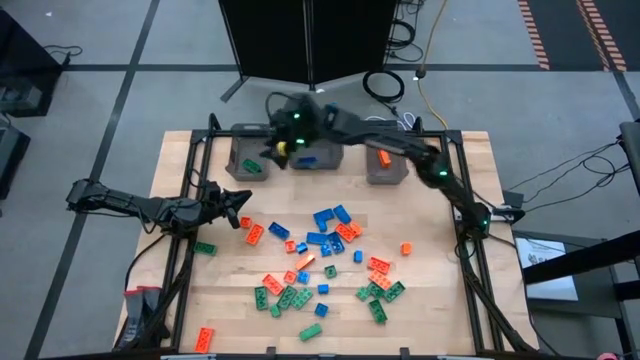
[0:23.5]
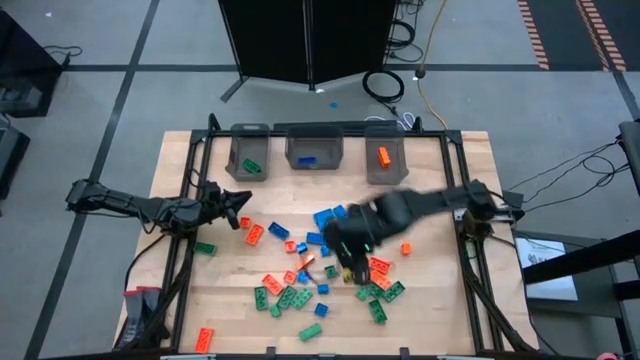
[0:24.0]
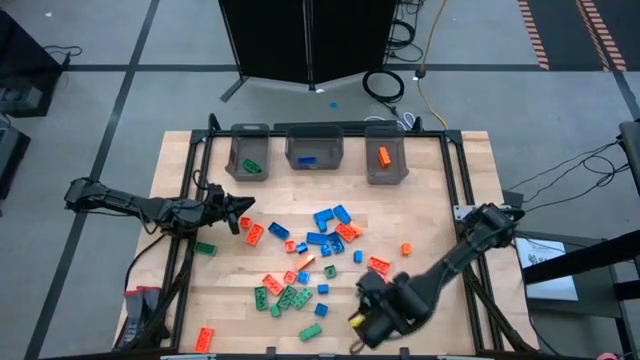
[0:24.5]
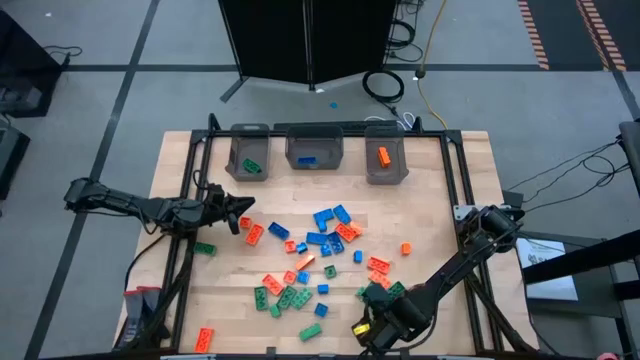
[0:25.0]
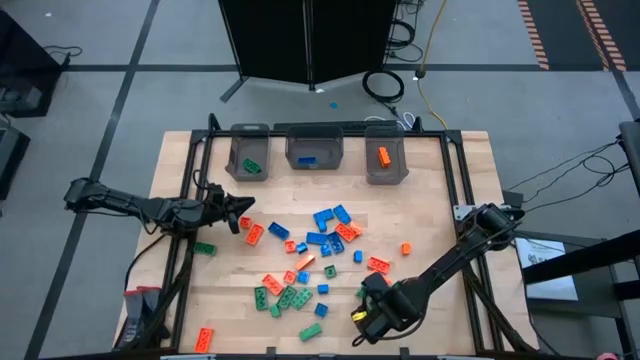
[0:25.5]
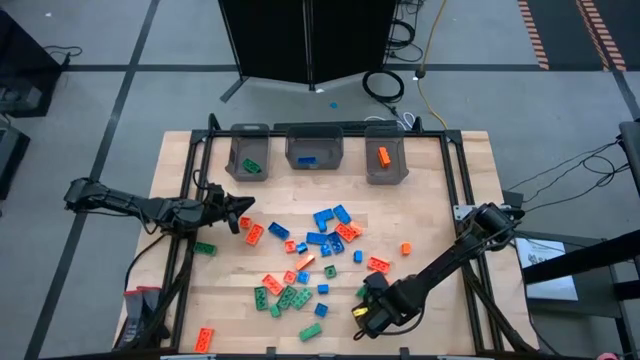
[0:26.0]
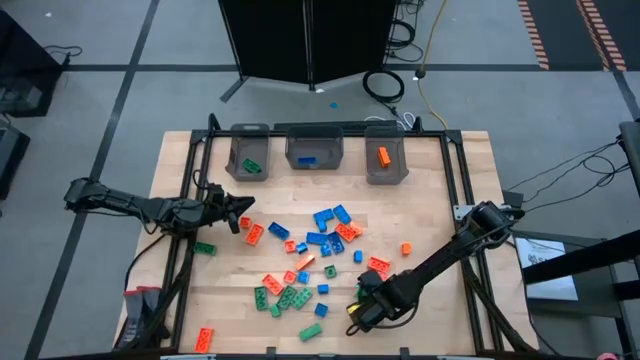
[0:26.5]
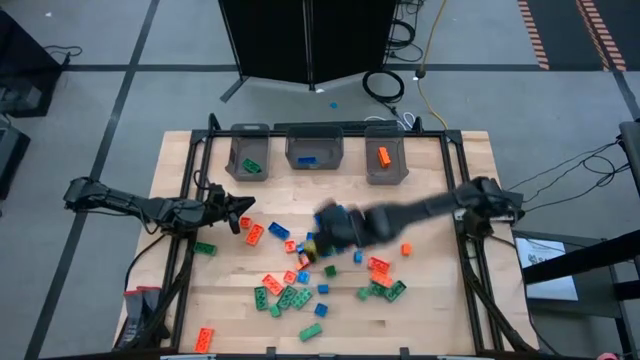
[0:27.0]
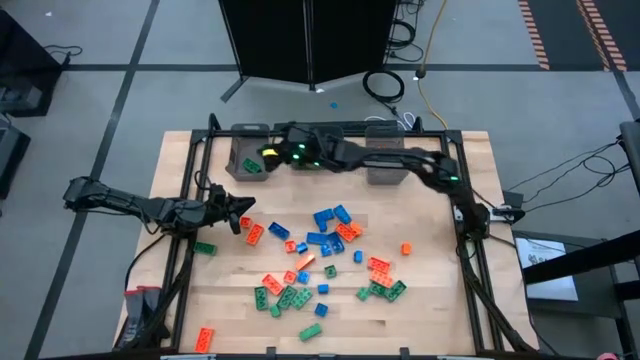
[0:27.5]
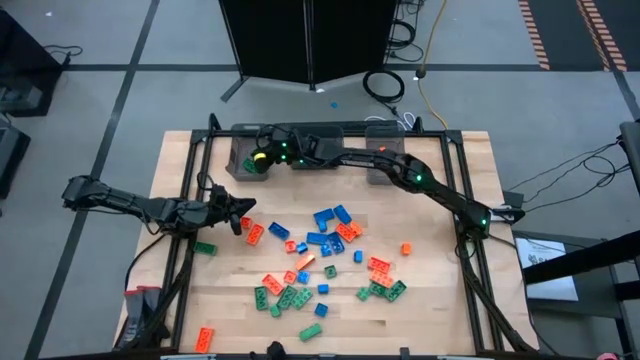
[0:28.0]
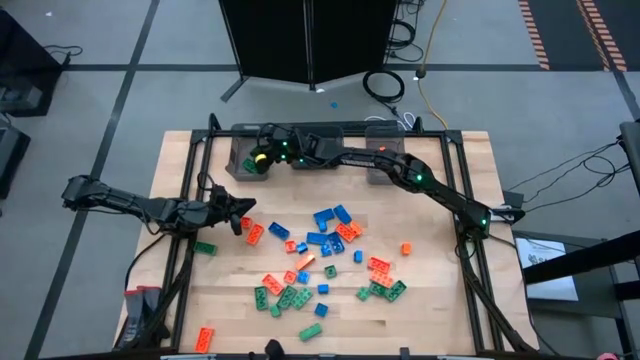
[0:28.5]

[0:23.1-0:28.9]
Task: Sort blocks
Put the green game piece into the left black bin

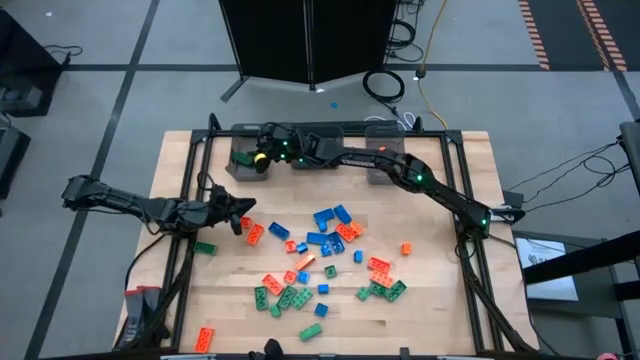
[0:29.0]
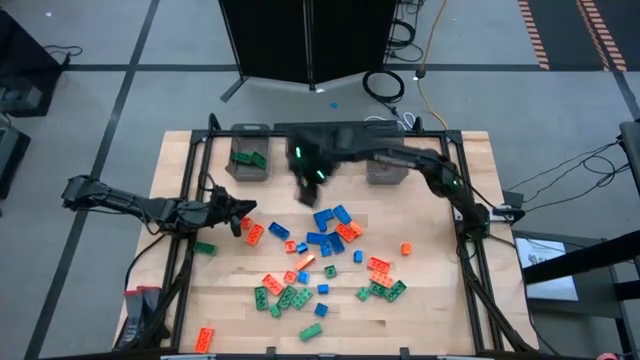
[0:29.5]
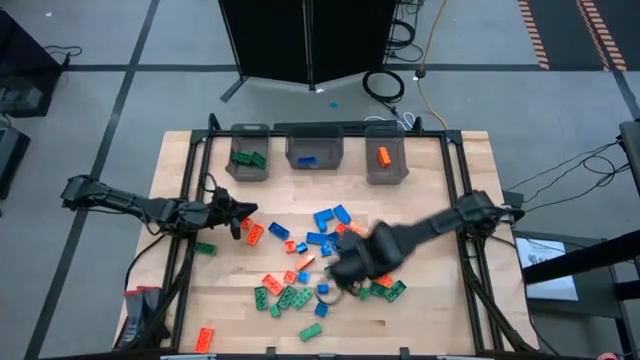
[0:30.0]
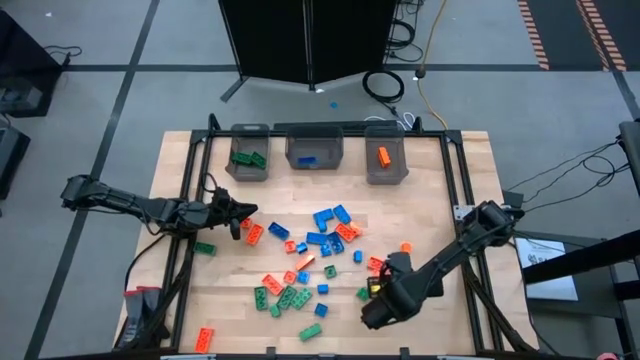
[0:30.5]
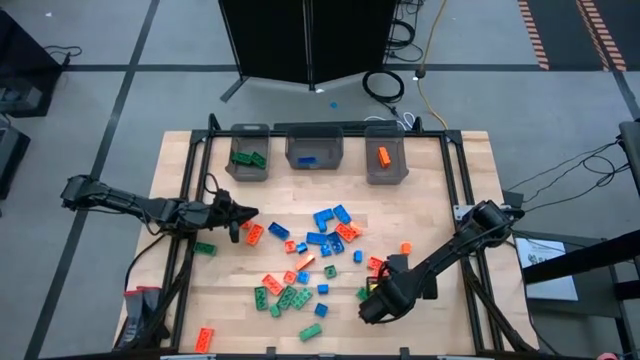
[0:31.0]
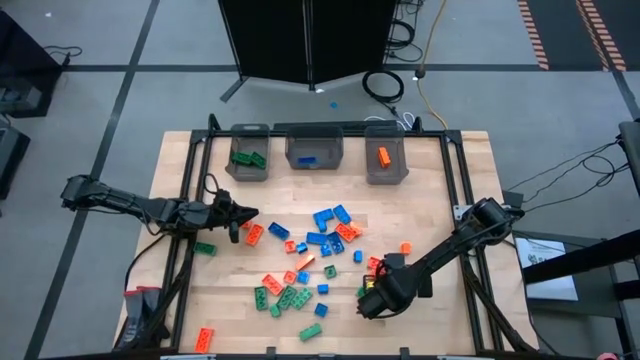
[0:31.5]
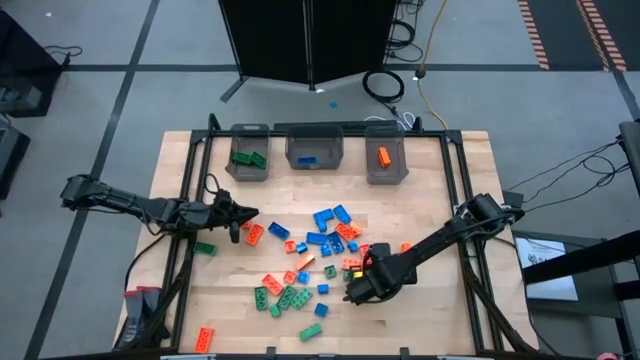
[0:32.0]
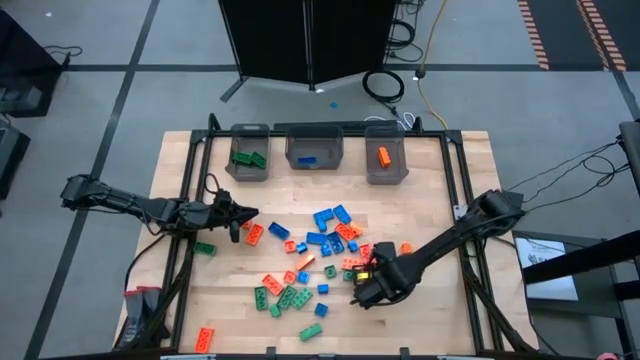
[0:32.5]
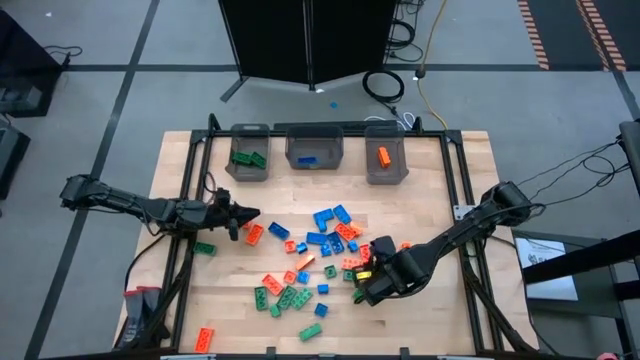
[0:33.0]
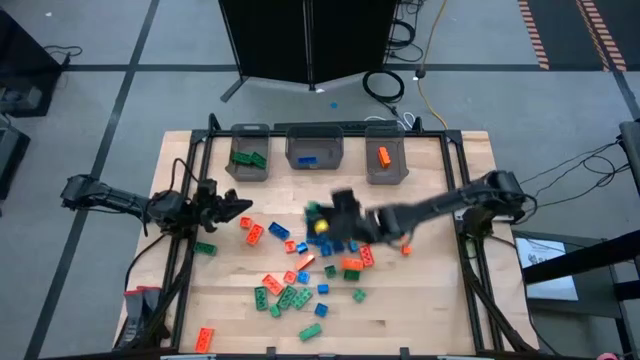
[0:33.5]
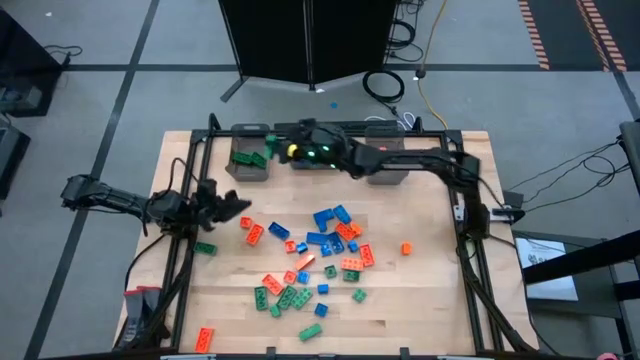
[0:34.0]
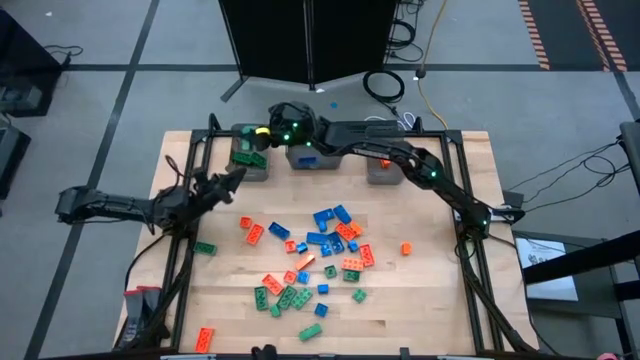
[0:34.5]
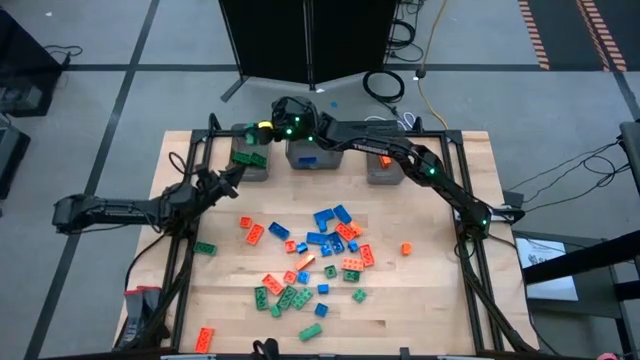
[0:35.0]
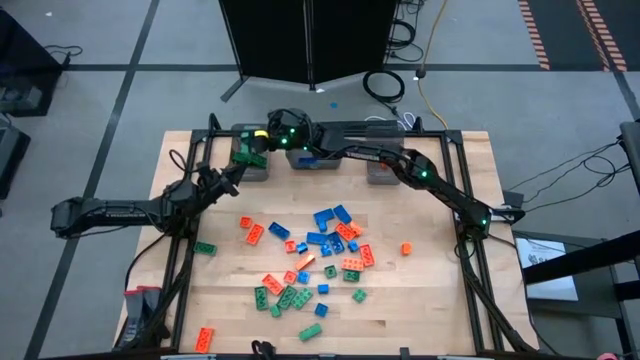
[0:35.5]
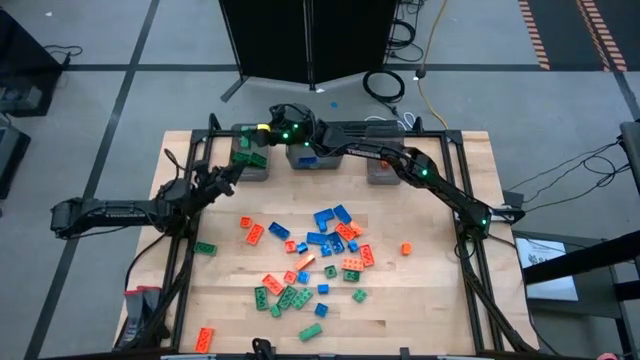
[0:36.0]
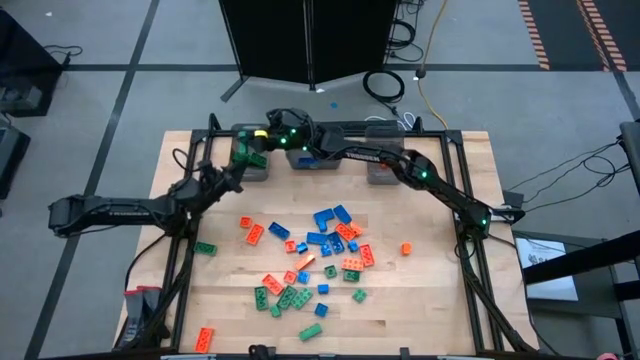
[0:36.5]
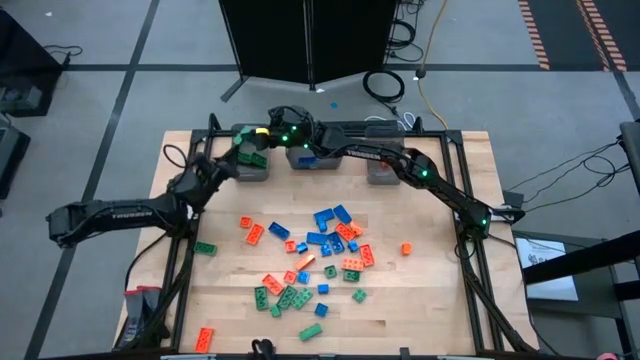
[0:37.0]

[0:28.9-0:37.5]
Put the green game piece into the left black bin

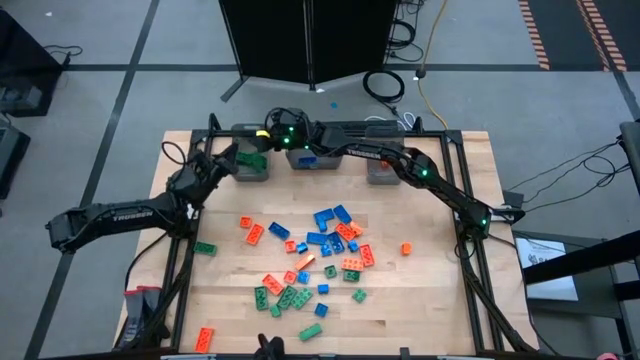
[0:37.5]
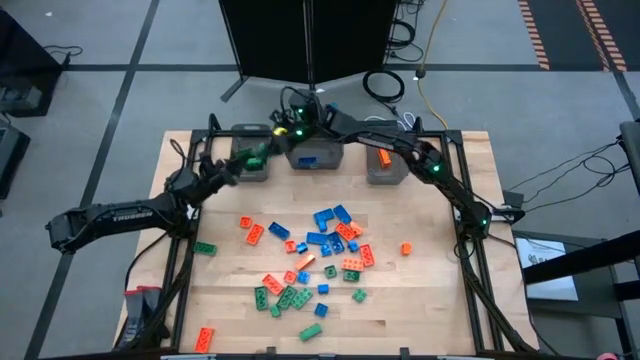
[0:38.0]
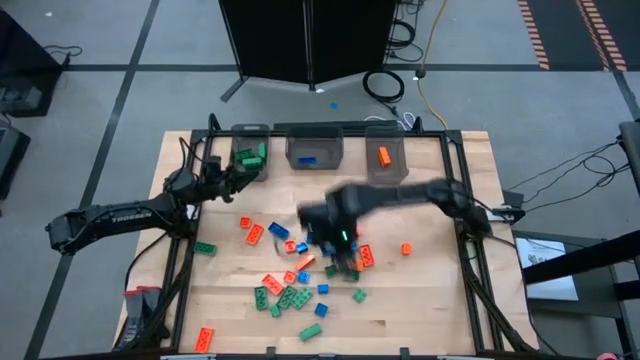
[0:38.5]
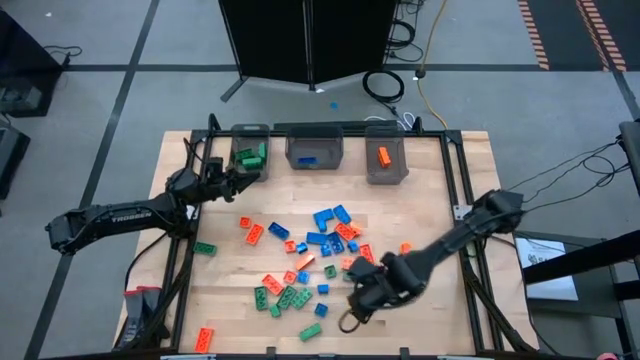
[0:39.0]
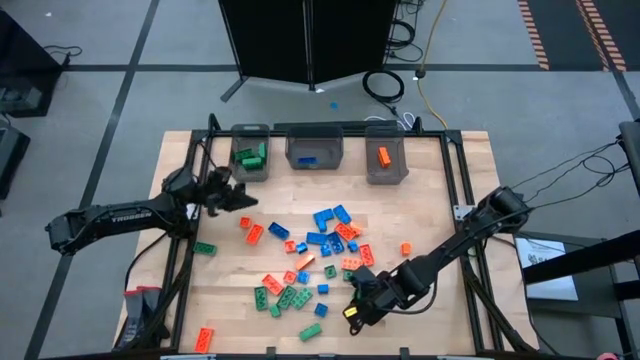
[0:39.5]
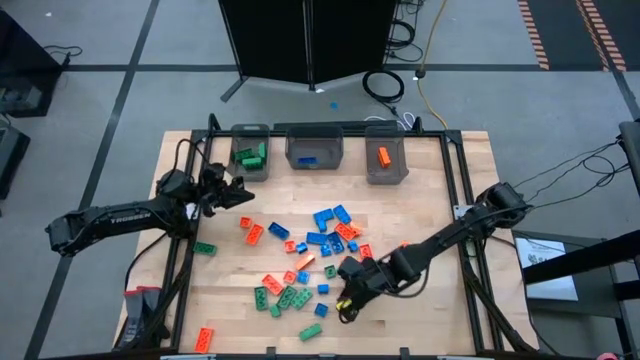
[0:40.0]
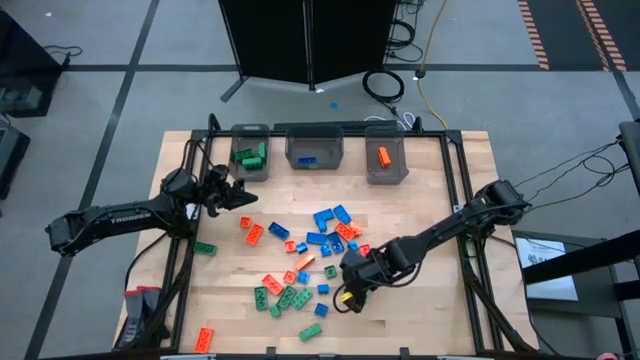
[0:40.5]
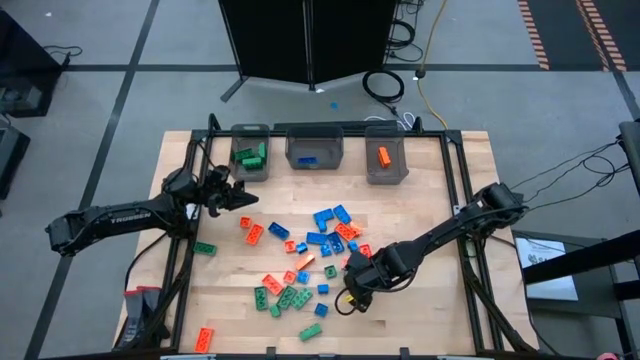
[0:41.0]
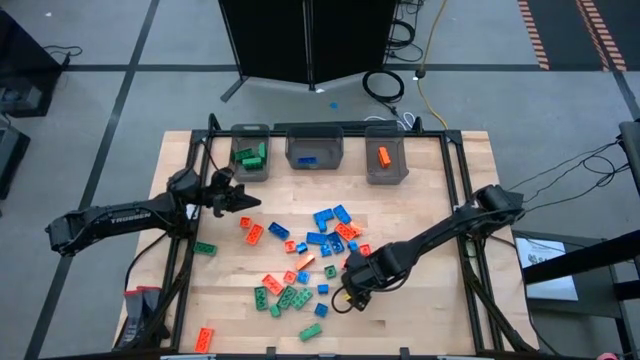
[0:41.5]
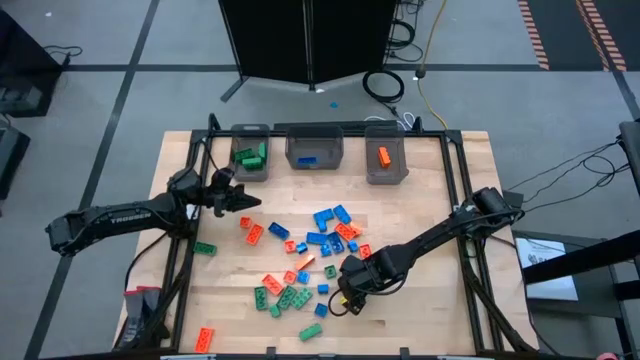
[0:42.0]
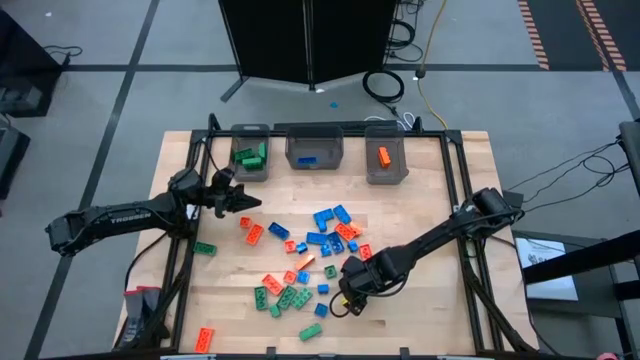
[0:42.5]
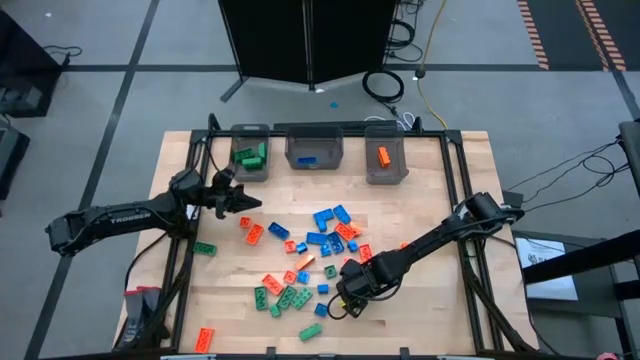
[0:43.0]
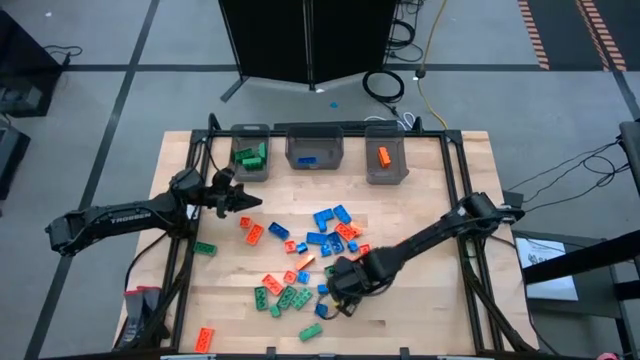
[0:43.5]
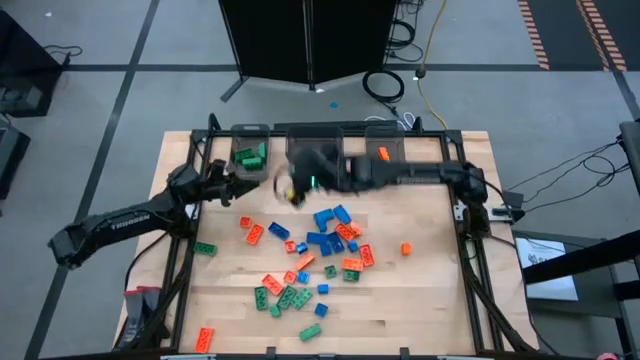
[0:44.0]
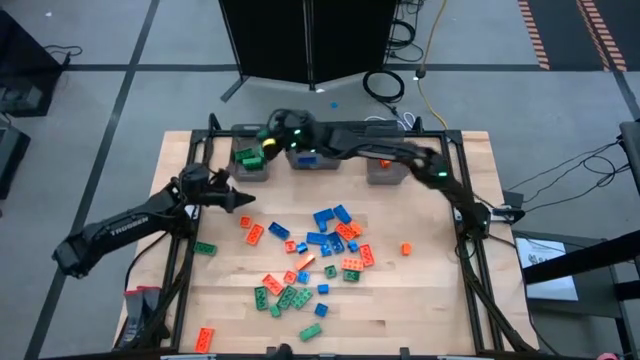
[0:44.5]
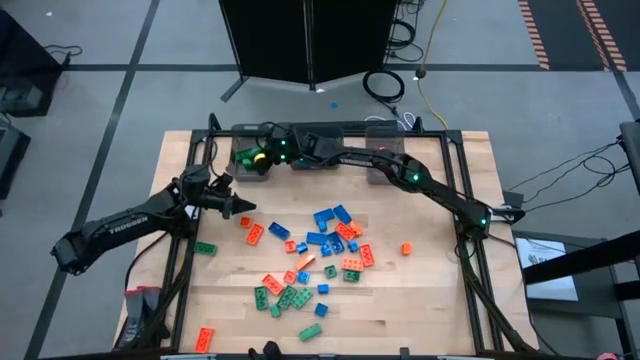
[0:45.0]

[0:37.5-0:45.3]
Put the green game piece into the left black bin
